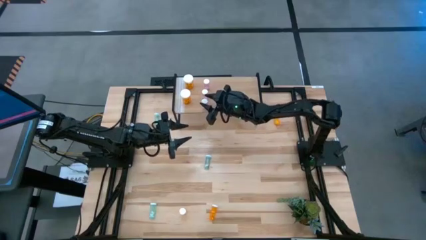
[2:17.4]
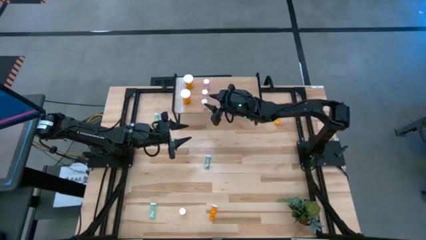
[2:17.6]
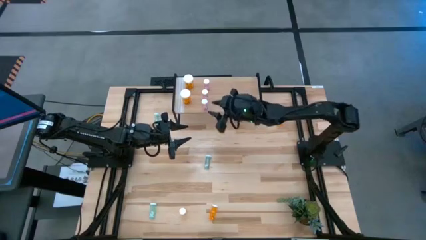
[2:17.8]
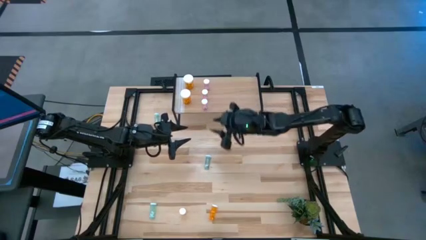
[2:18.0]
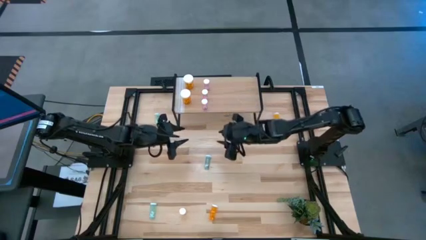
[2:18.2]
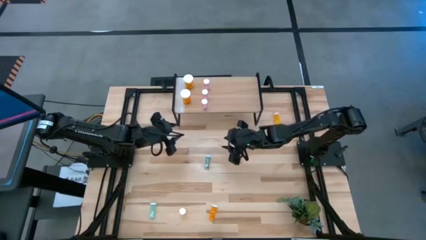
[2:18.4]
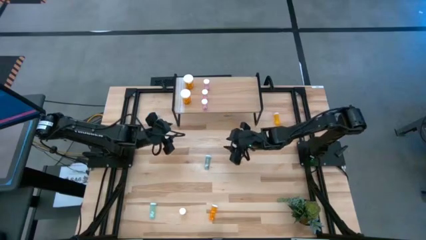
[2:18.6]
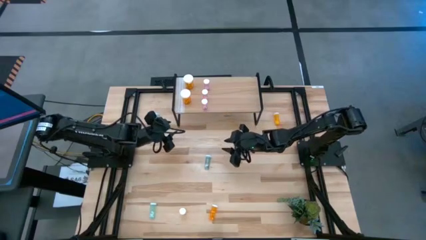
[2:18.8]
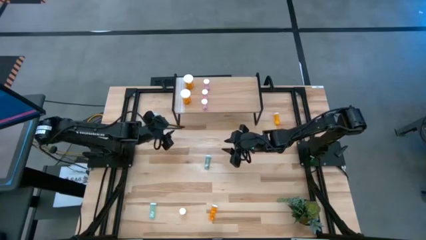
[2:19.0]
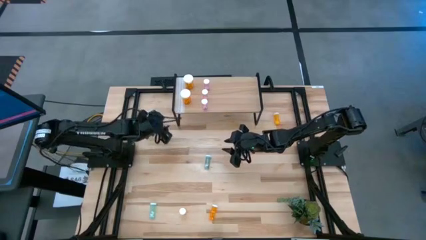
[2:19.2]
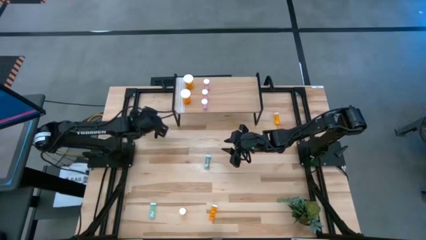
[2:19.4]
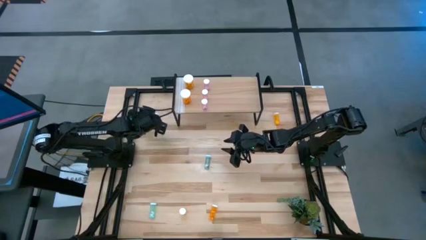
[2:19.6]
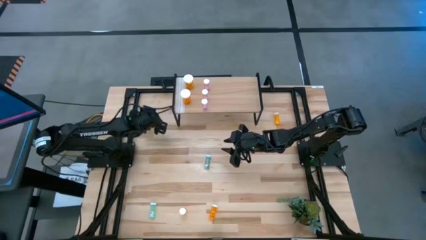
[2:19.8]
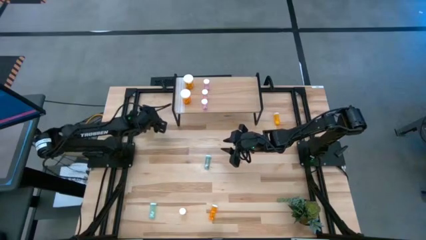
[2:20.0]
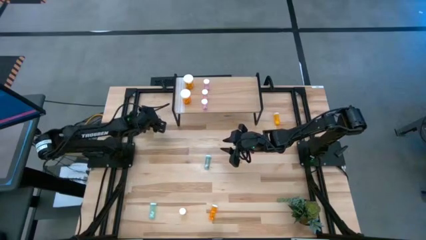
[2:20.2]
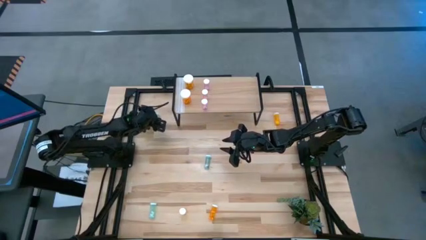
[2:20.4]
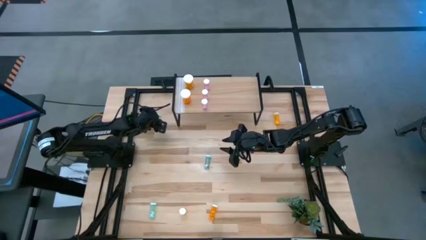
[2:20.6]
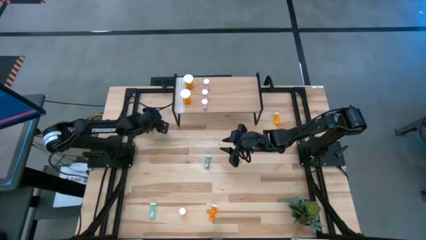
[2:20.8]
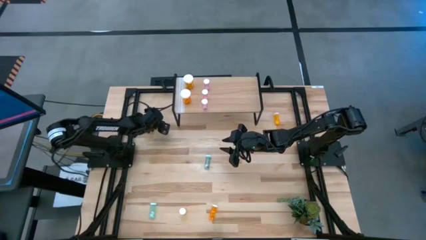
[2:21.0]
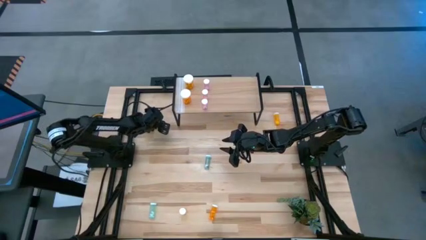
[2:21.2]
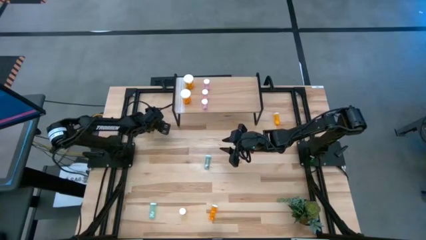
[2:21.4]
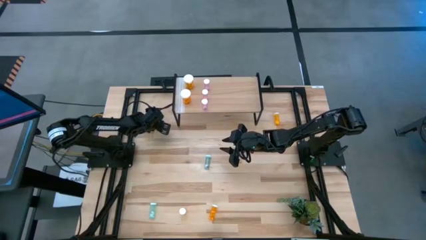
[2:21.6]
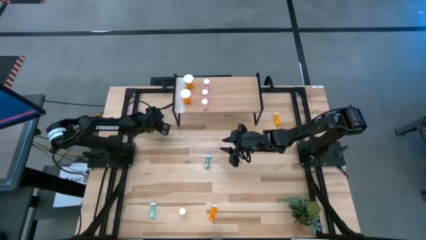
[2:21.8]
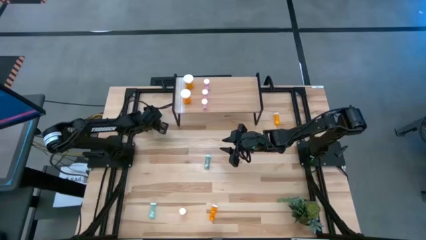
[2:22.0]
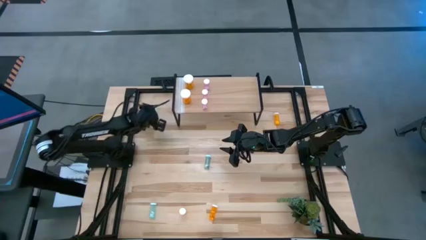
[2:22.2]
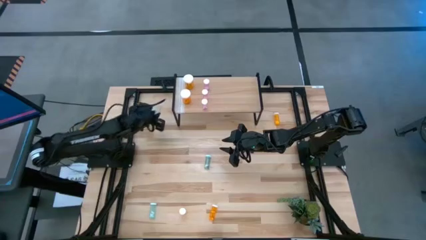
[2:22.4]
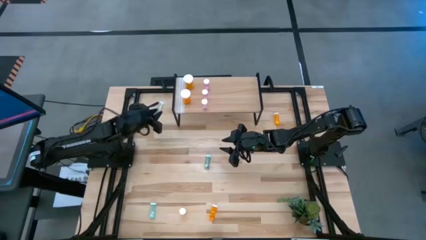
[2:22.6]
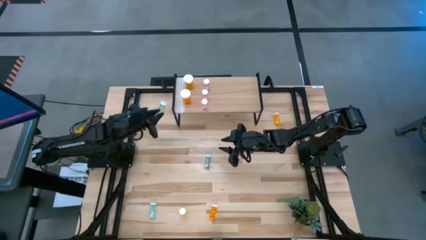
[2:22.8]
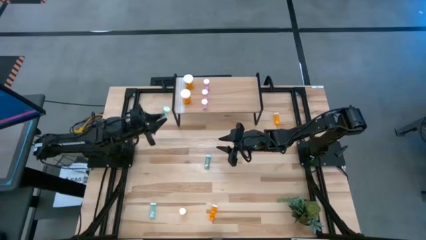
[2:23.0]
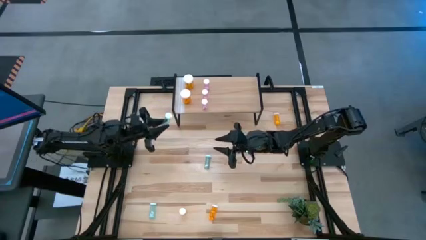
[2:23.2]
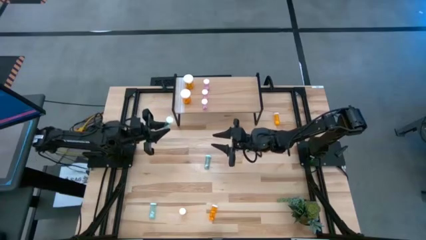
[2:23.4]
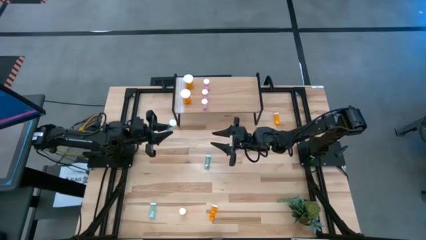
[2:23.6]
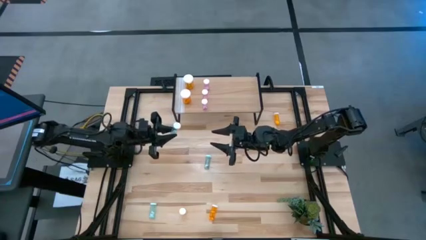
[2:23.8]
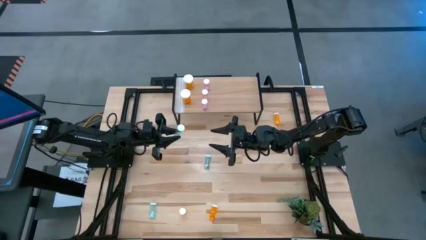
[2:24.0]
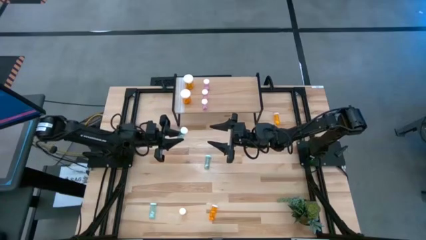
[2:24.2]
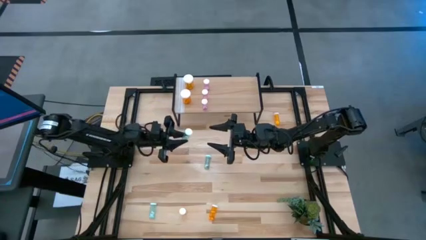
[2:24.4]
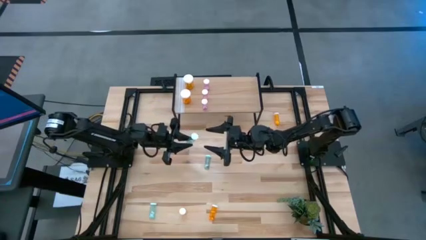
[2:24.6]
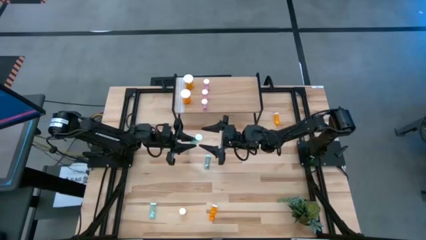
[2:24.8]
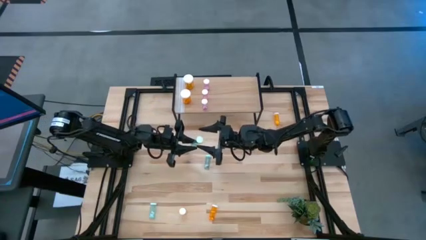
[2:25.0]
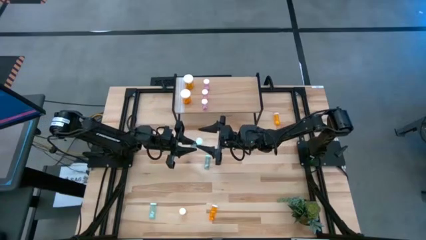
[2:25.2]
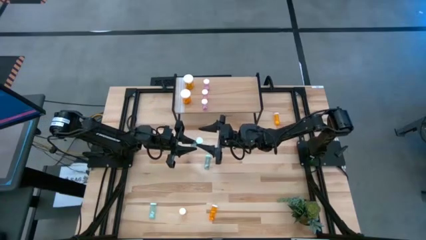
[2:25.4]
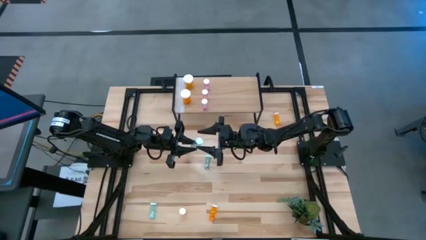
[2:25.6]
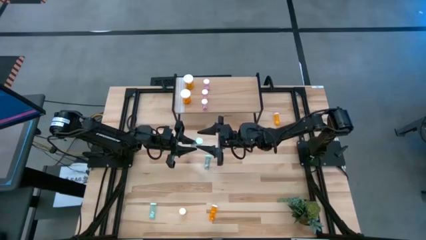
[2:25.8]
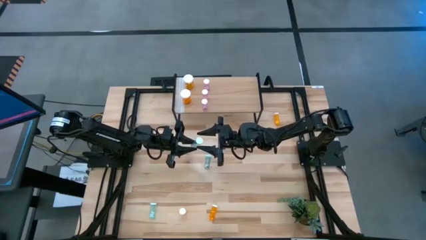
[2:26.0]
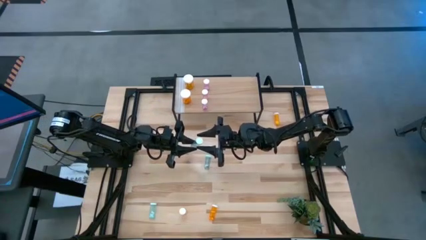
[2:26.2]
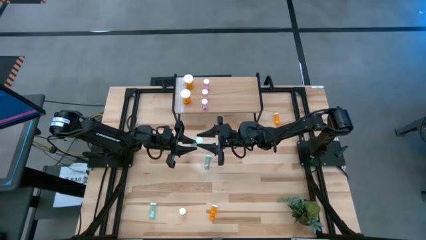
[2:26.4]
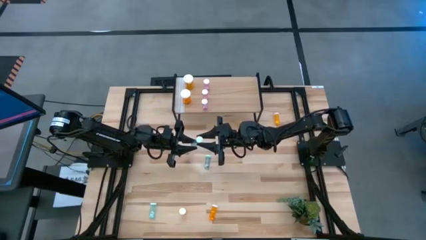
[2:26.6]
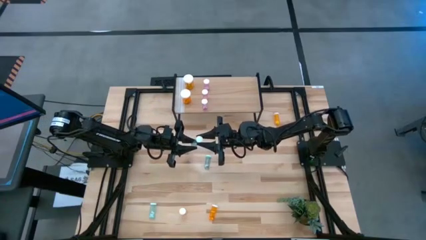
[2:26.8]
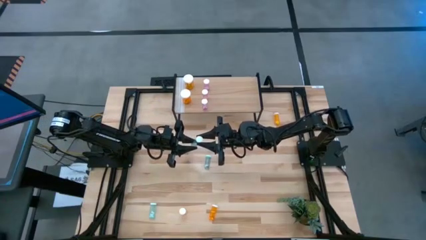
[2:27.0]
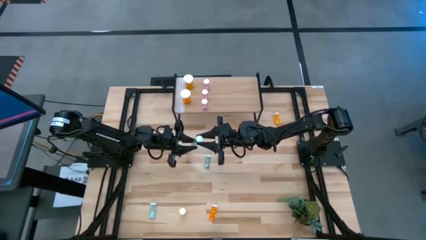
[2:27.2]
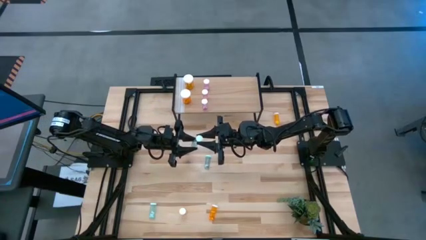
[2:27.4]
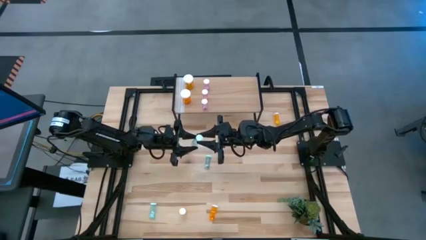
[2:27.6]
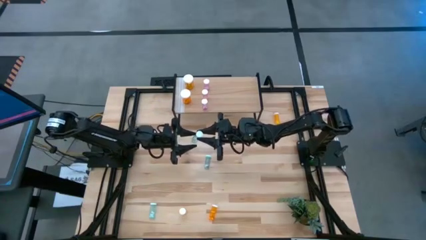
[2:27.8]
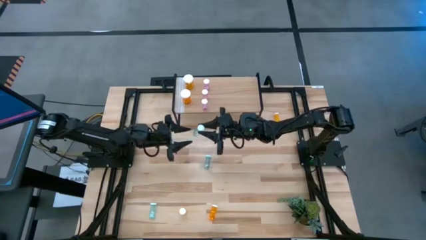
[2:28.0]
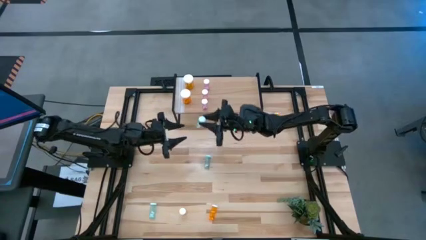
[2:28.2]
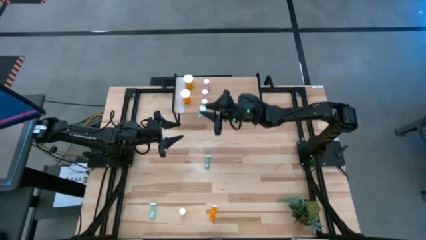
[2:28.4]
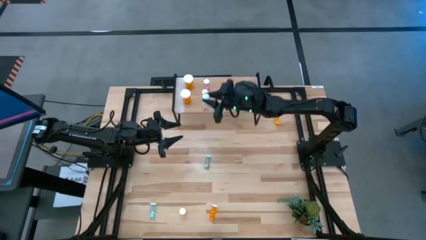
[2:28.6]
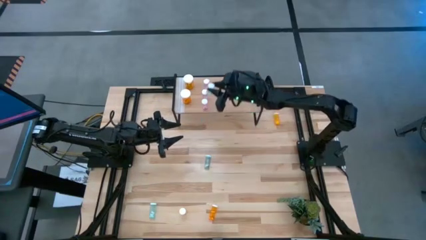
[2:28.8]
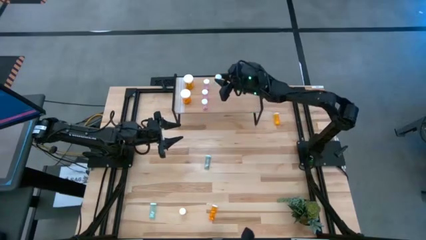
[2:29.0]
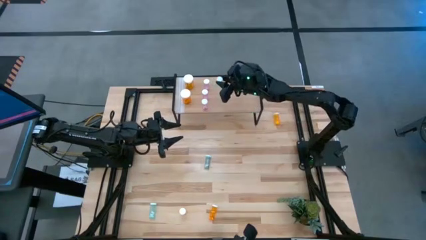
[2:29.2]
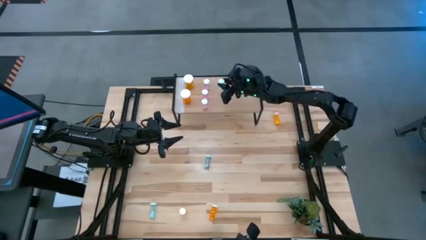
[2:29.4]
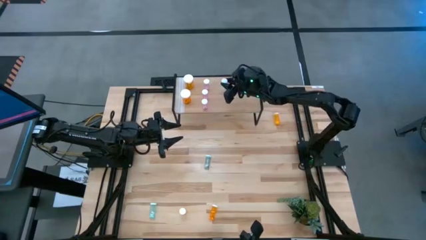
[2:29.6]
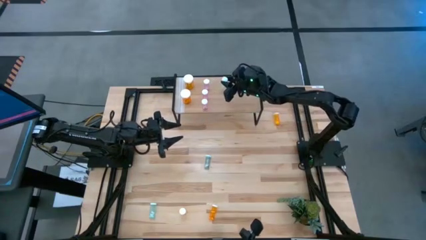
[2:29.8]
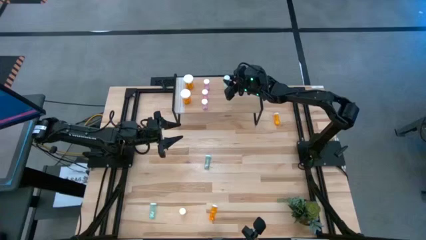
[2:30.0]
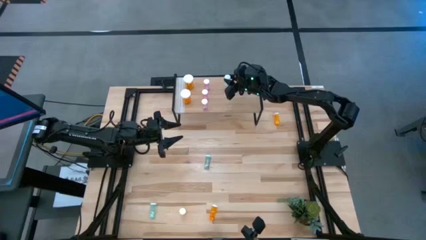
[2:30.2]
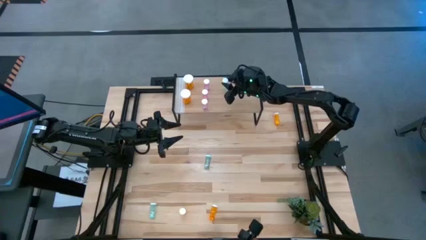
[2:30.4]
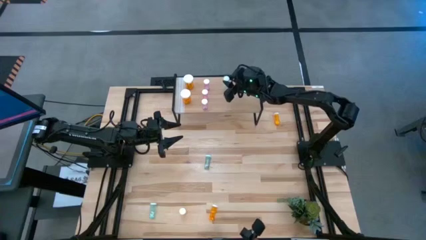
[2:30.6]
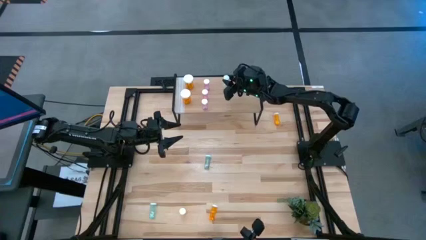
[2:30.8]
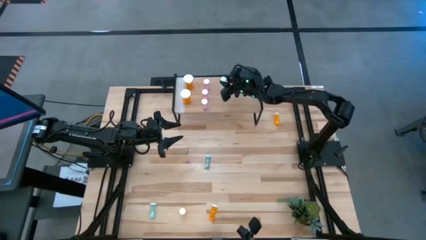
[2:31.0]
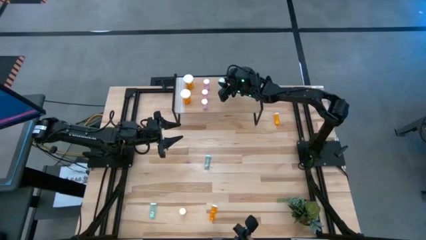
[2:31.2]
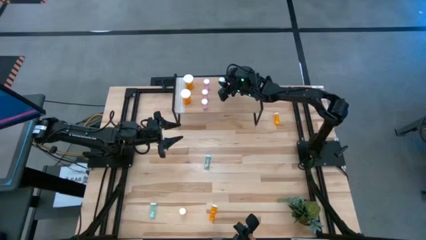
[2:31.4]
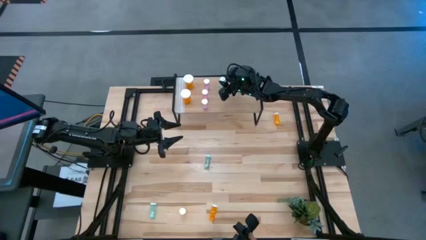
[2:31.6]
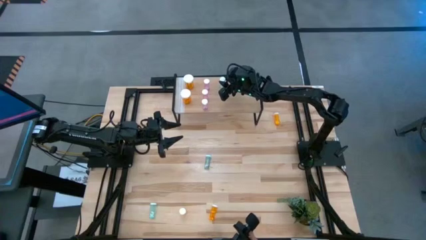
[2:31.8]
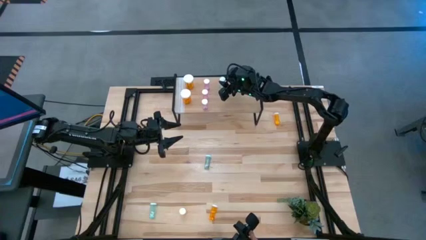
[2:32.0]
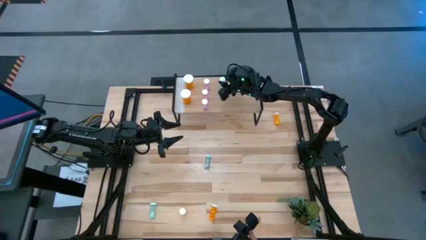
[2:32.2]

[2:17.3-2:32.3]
Task: Pick and place medicine bottles onto shelf by color
Put the top small blue pill bottle on the shelf

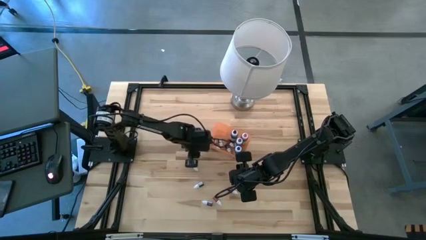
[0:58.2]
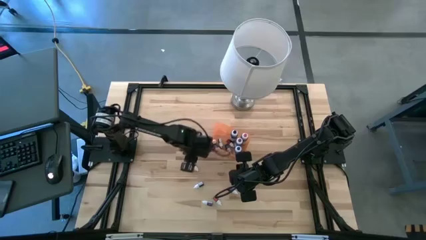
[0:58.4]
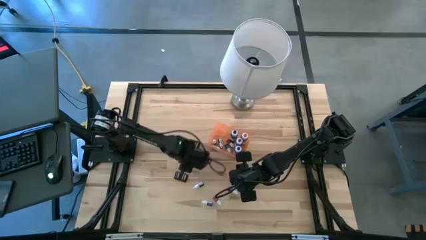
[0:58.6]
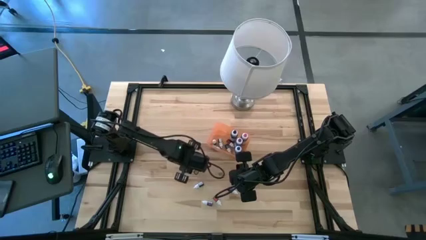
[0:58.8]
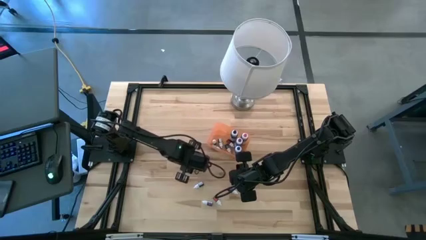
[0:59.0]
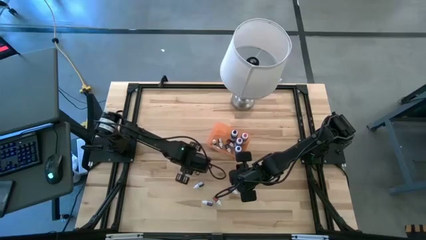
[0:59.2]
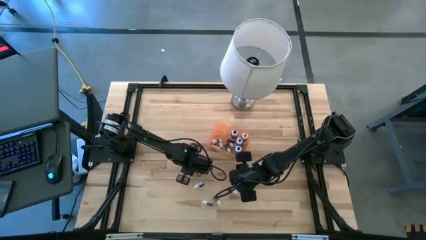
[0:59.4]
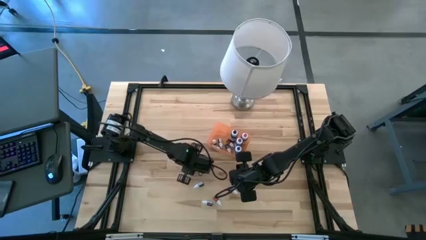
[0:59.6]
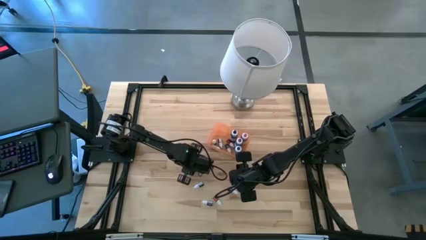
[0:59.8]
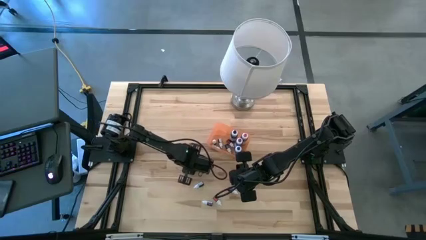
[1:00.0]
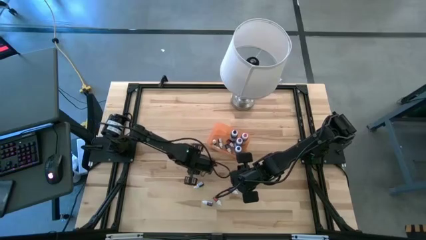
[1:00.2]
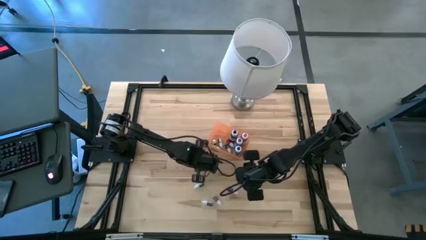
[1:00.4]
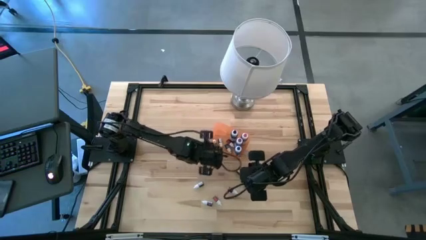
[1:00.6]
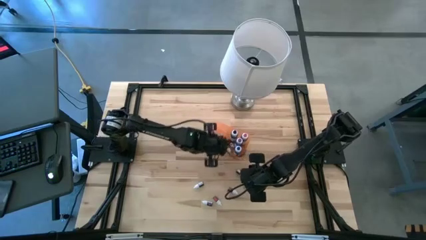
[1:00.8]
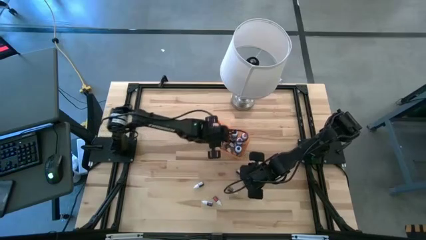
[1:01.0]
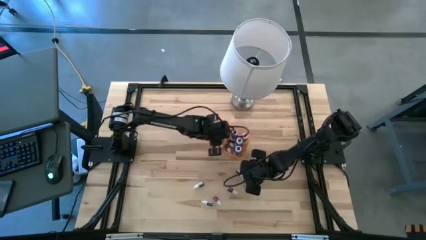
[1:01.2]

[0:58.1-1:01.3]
Task: Pick & Place food coloring
Put the small purple food coloring bottle into the orange bin
